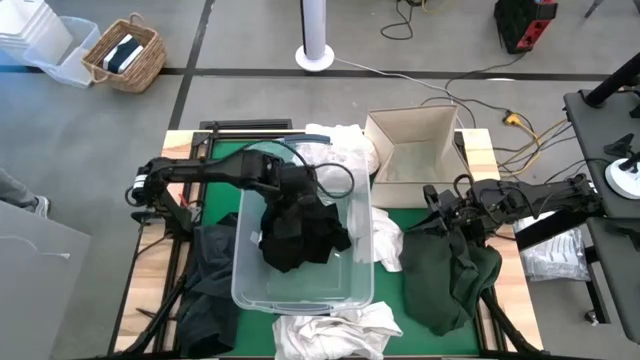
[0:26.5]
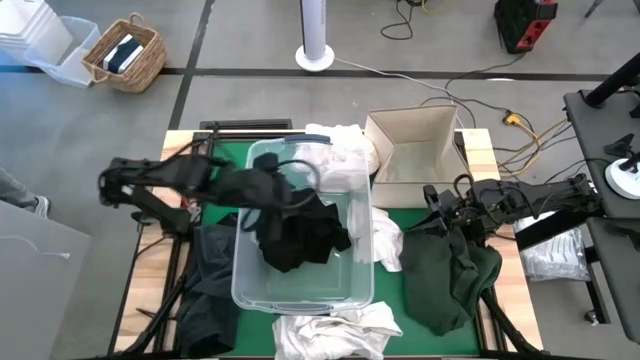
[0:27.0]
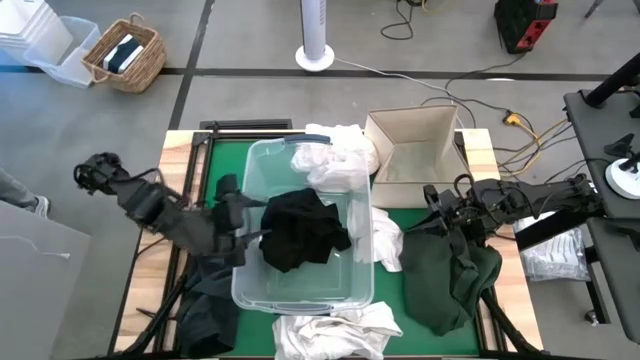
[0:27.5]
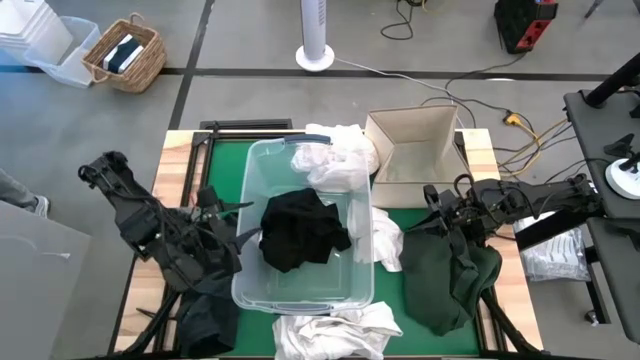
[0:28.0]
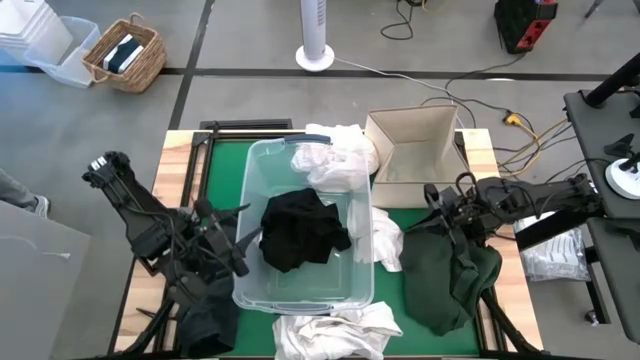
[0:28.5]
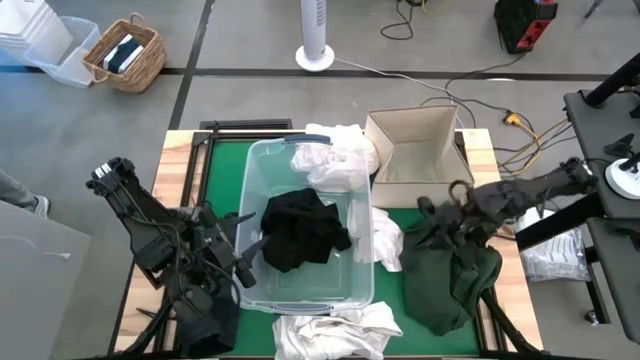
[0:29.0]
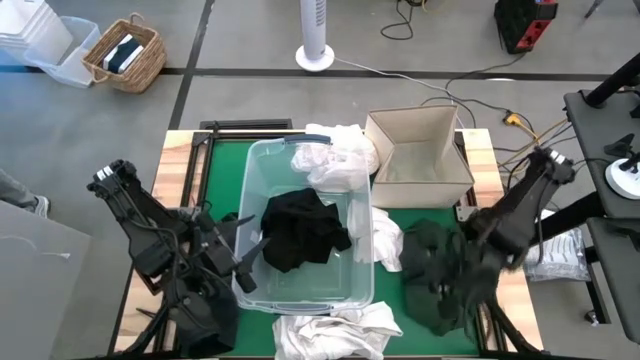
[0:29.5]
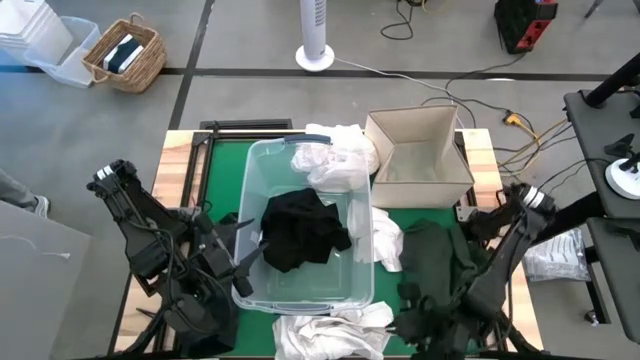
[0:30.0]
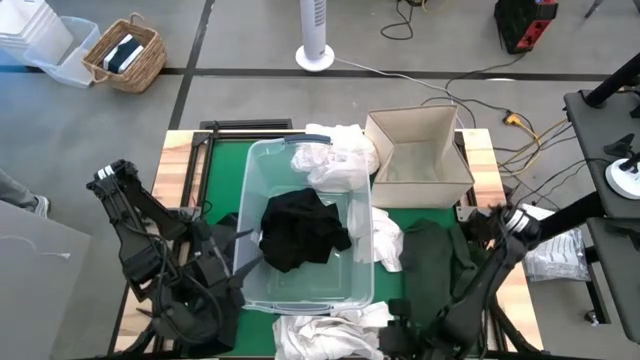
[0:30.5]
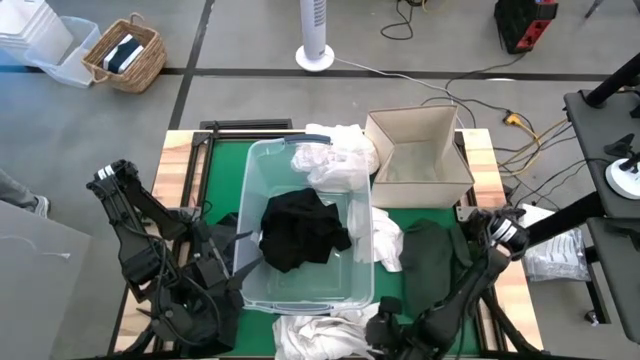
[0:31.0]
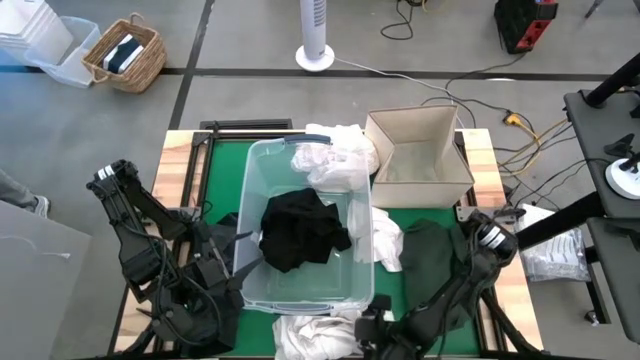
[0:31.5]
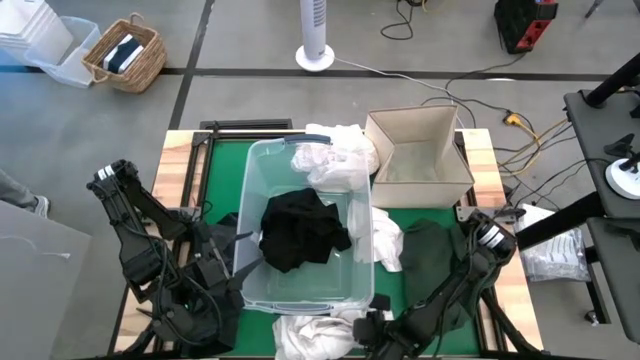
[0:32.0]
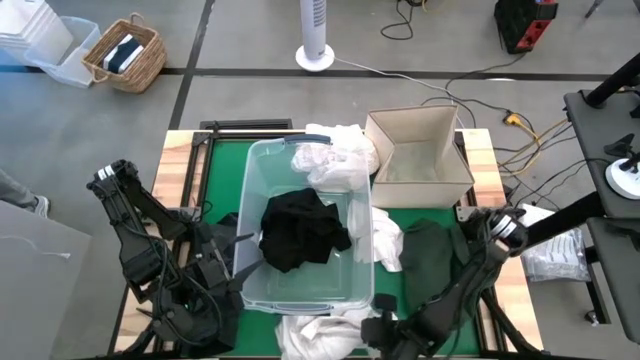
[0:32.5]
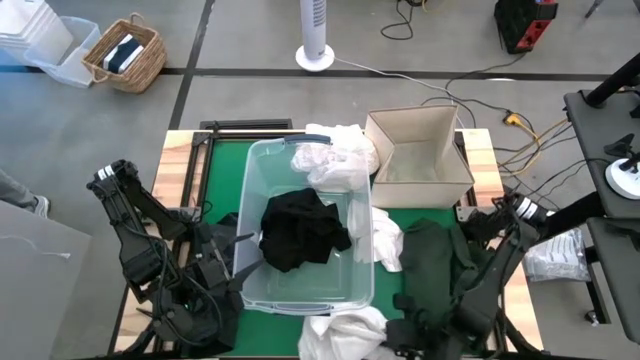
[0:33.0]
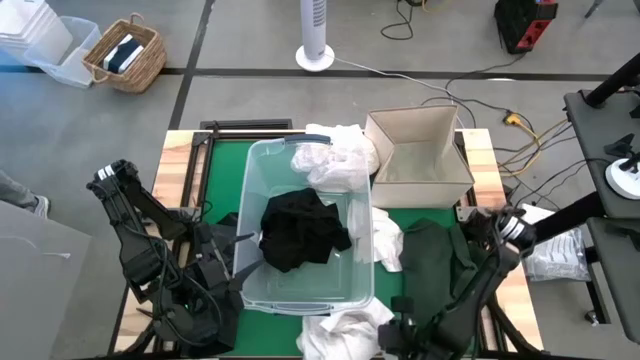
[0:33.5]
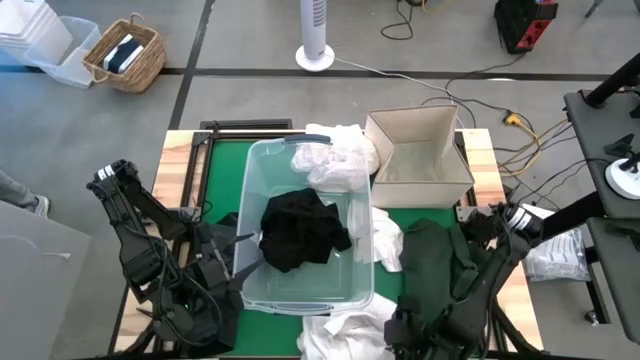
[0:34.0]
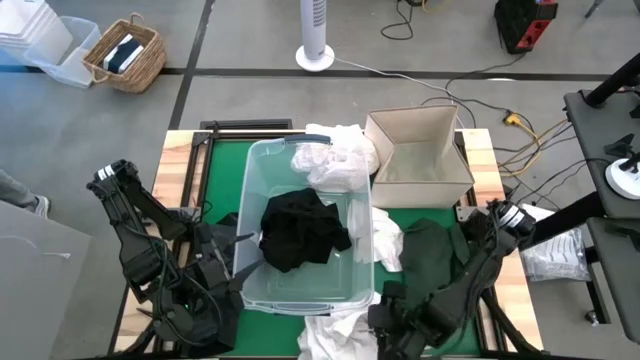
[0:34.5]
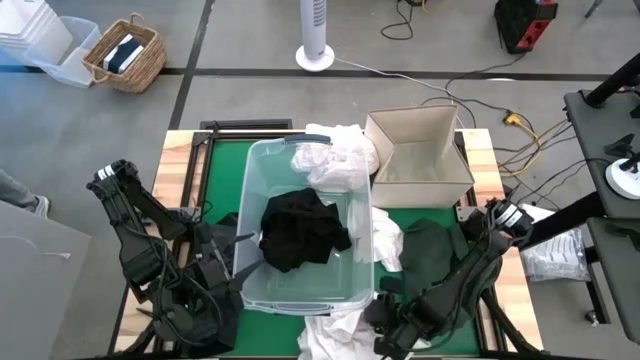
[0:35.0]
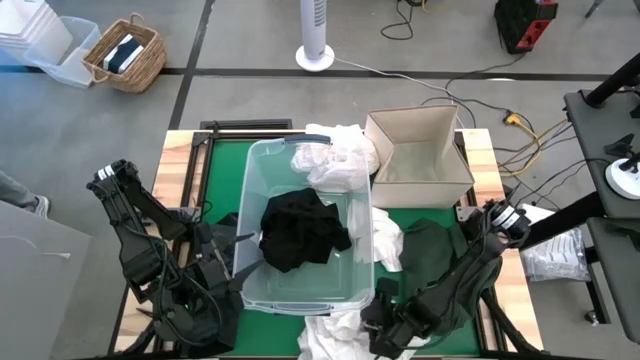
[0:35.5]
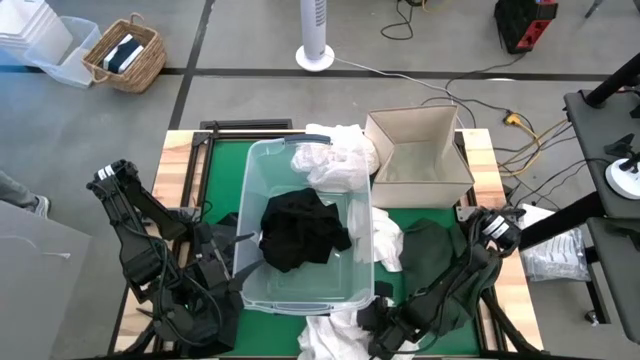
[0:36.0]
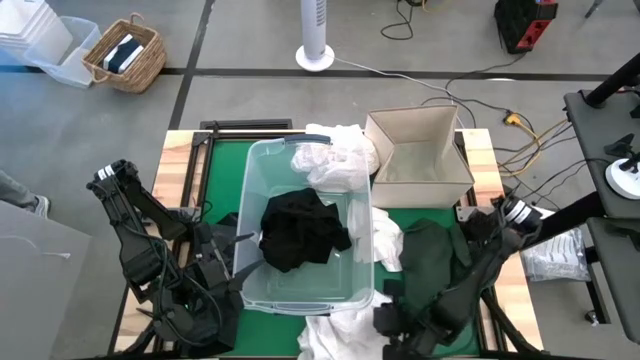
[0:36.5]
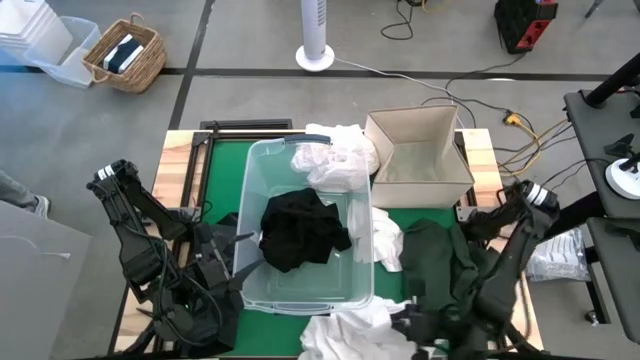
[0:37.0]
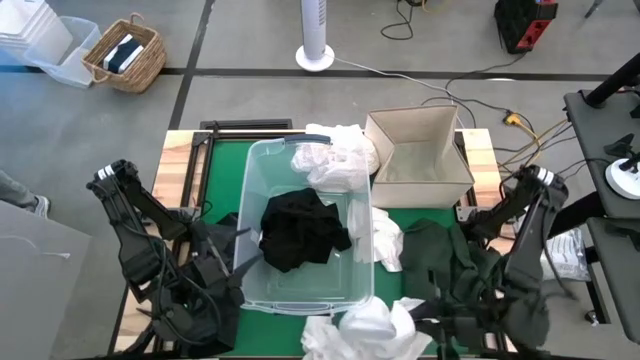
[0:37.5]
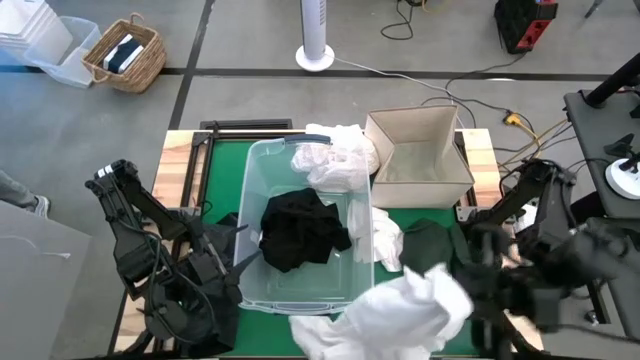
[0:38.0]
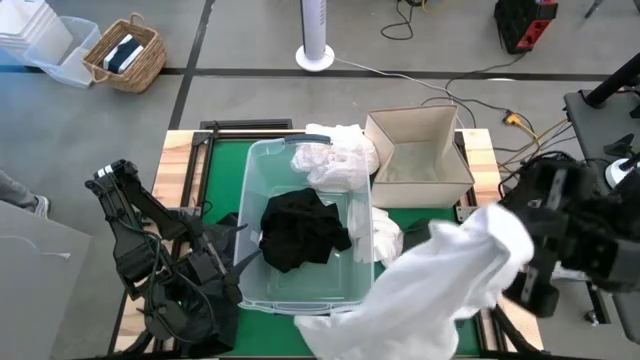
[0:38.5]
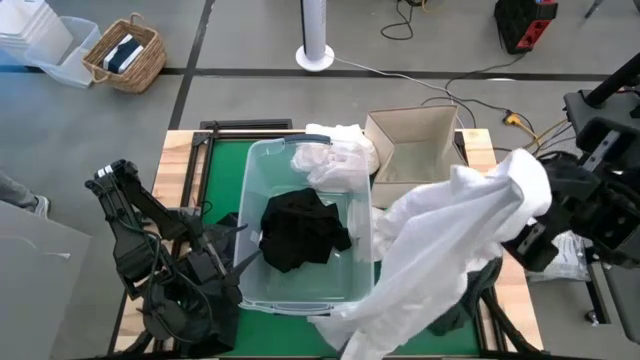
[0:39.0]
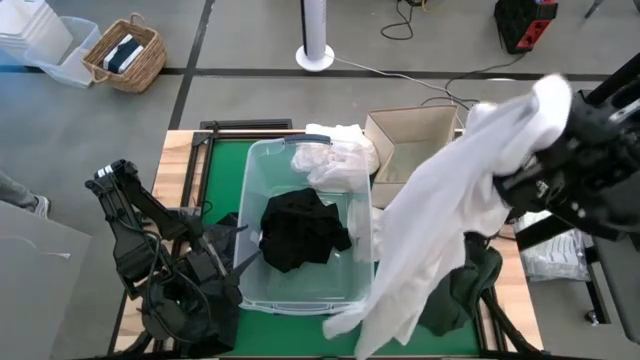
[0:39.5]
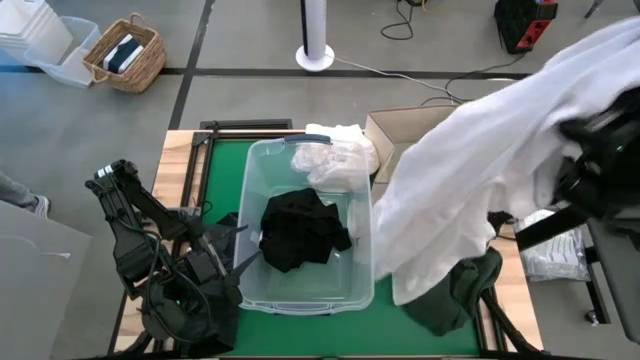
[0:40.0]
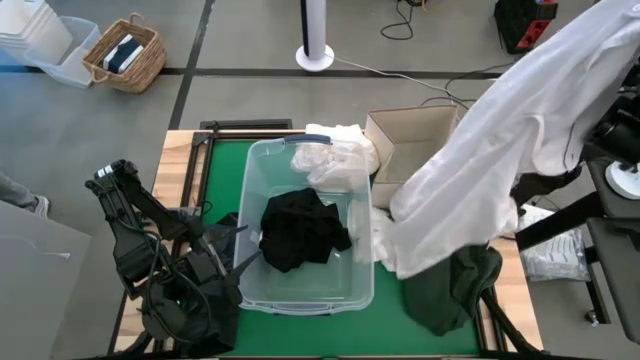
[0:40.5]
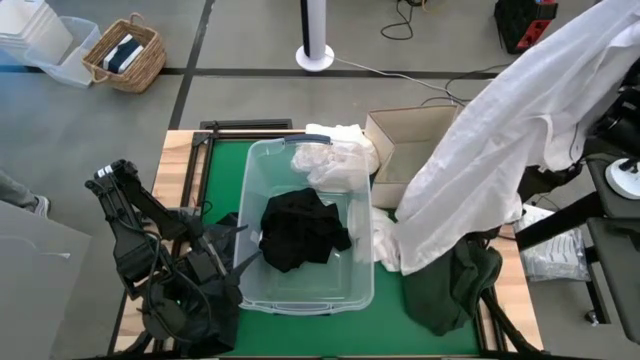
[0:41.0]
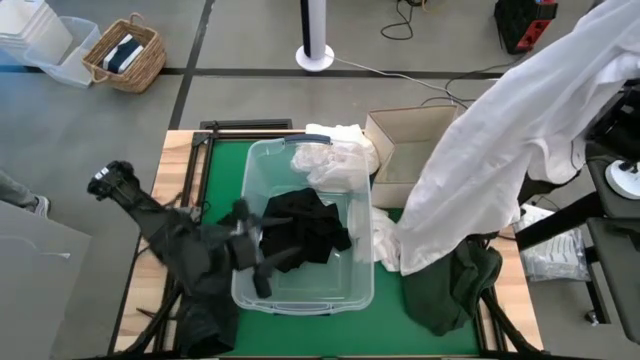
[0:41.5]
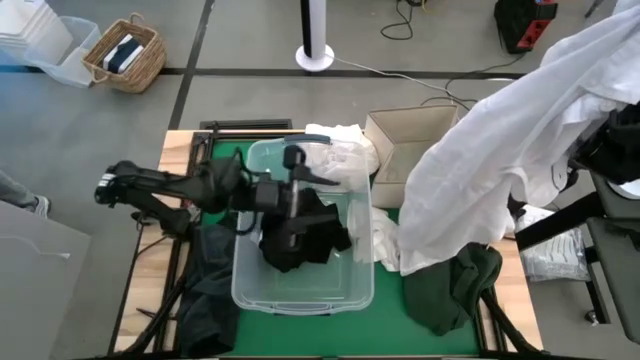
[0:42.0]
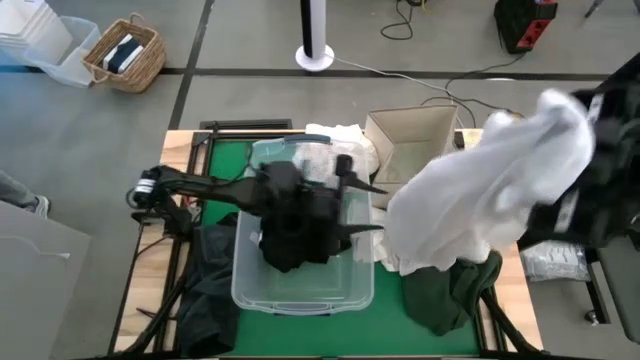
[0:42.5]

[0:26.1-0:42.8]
Put the white polo shirt into the laundry organizer

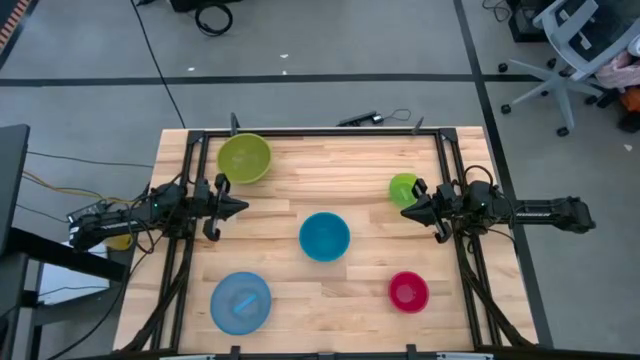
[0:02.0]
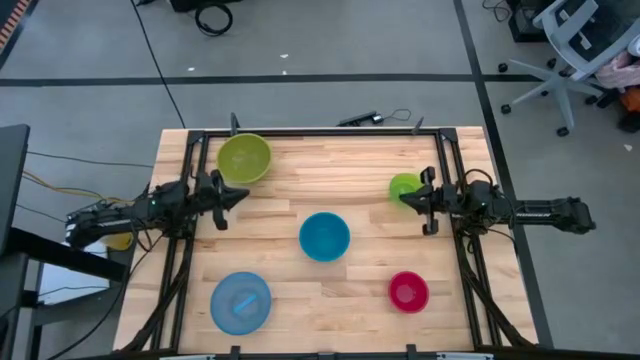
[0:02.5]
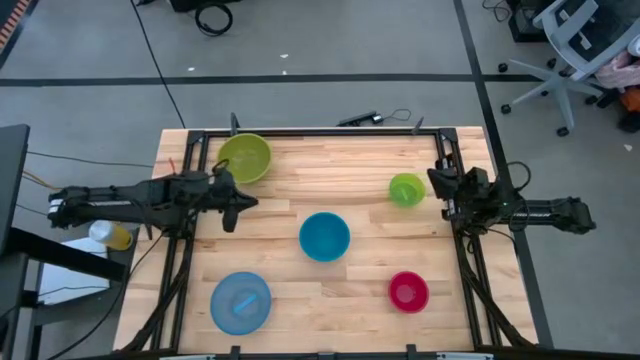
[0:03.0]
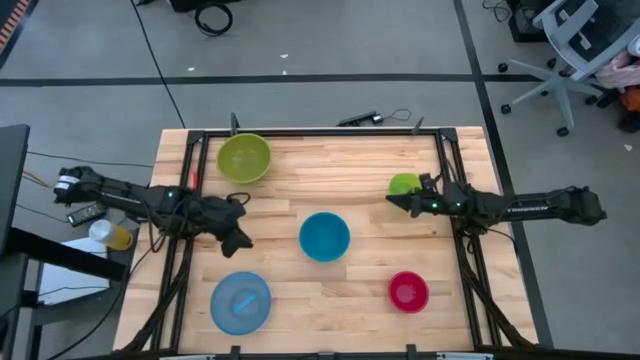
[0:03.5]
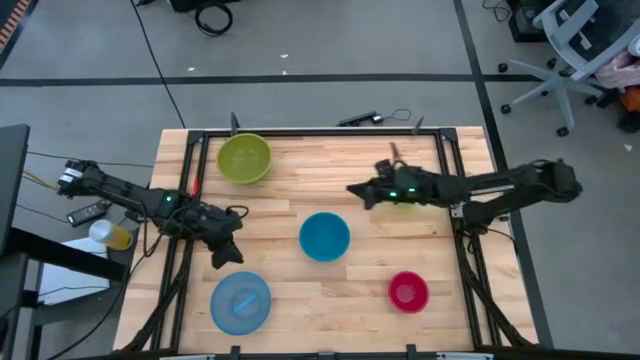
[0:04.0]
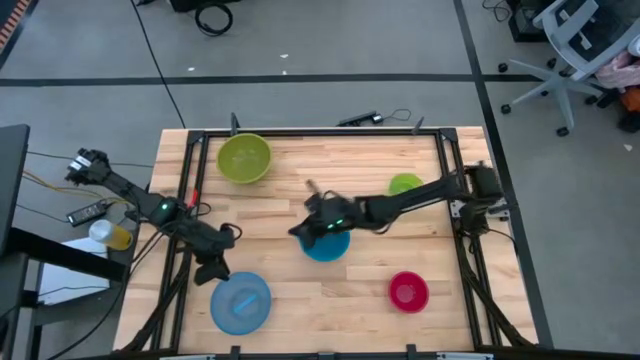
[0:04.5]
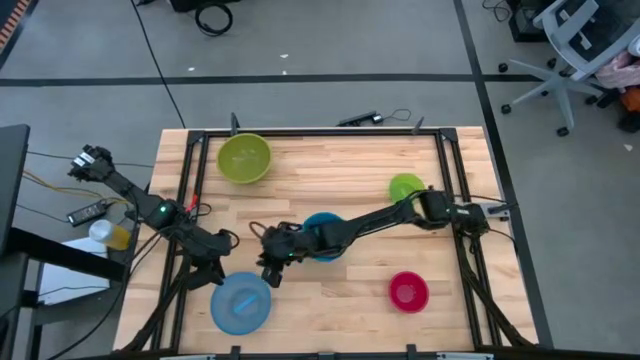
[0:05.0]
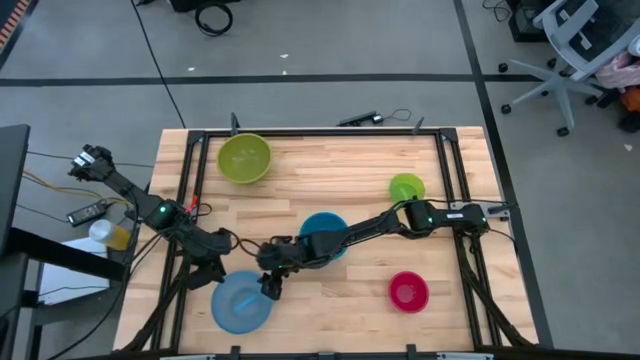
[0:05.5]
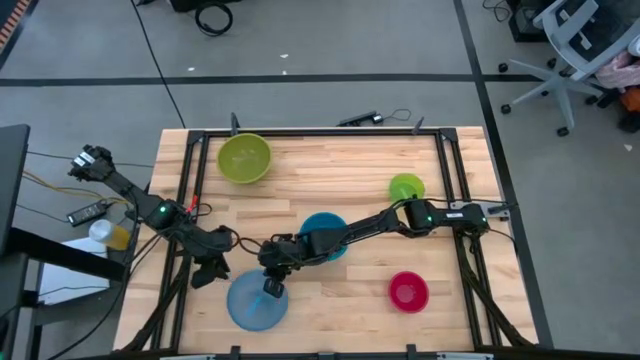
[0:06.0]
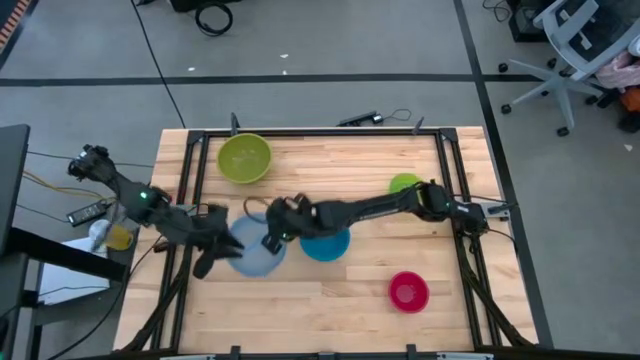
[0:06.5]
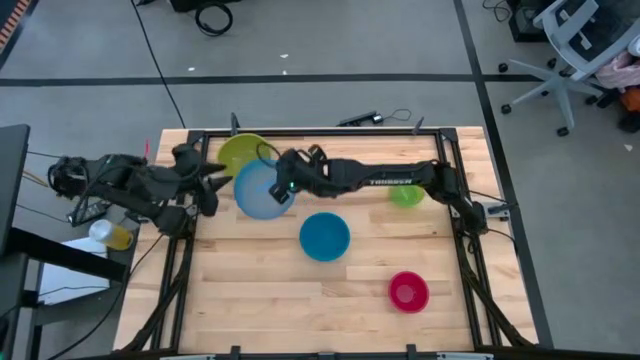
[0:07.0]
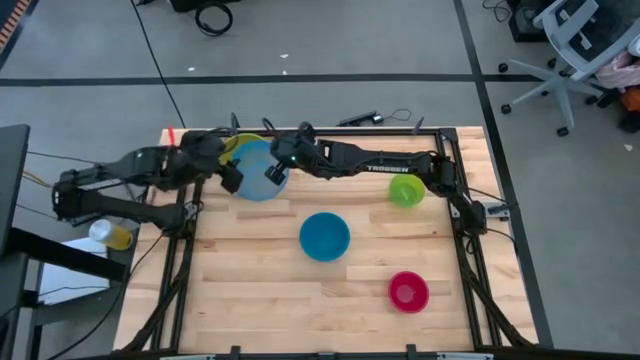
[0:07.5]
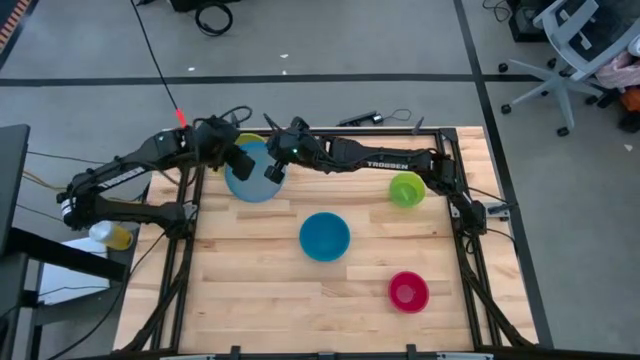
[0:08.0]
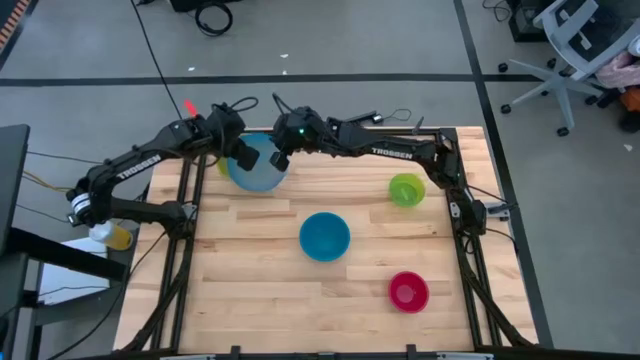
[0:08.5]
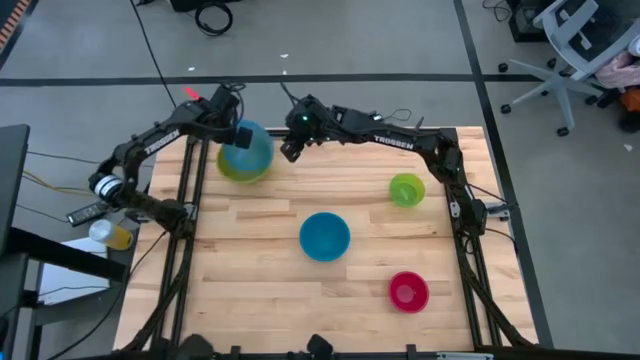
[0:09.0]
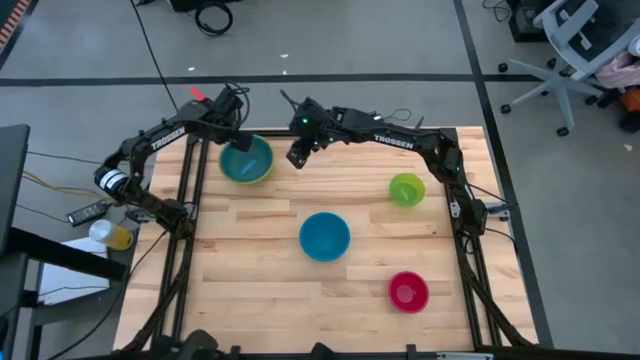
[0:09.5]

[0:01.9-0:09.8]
Stack the light blue bowl on the green bowl
